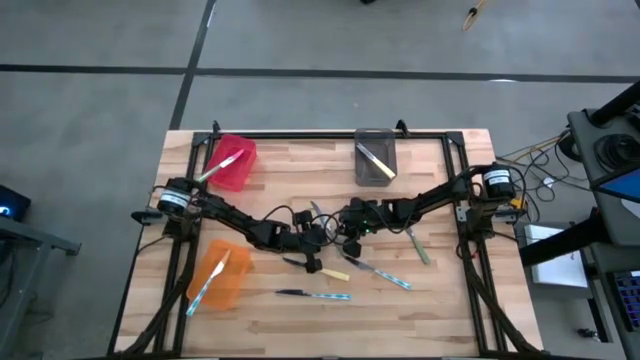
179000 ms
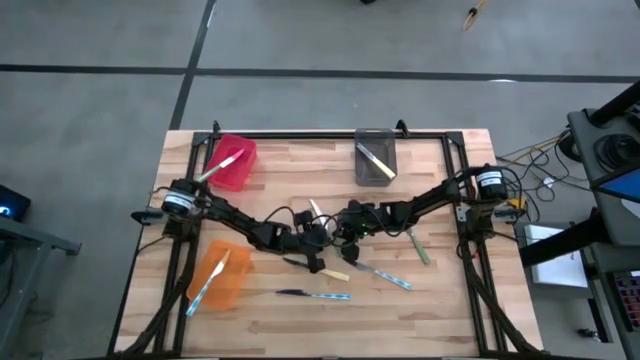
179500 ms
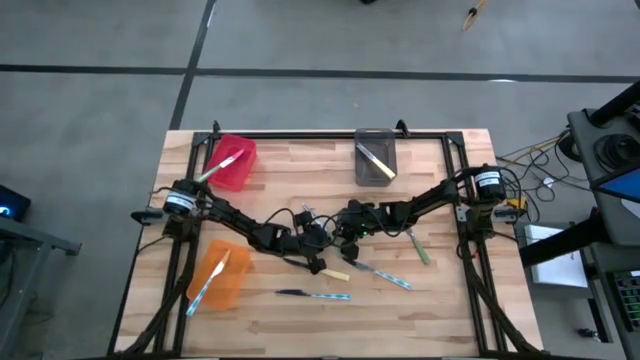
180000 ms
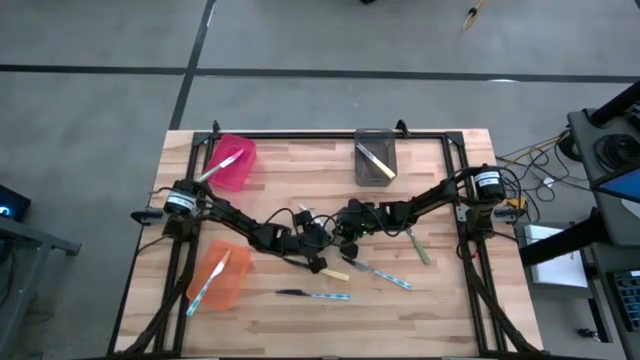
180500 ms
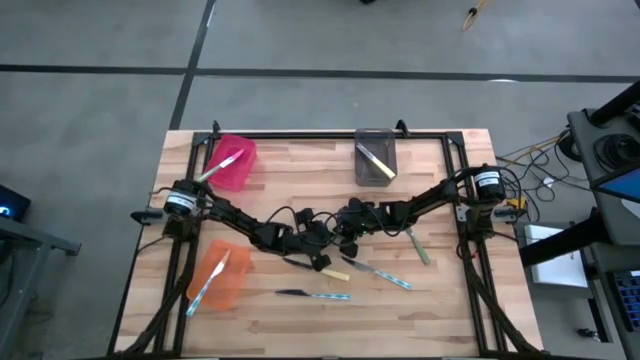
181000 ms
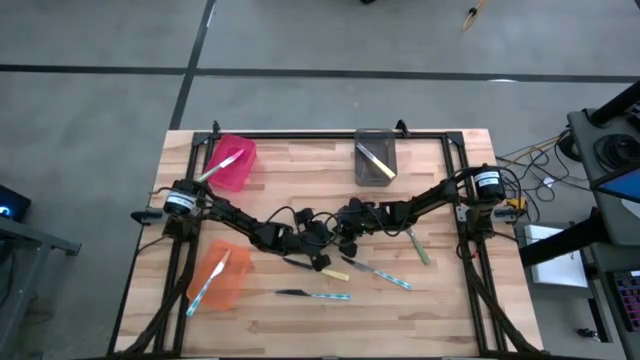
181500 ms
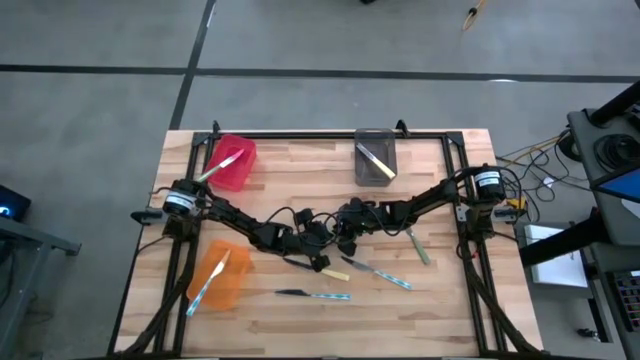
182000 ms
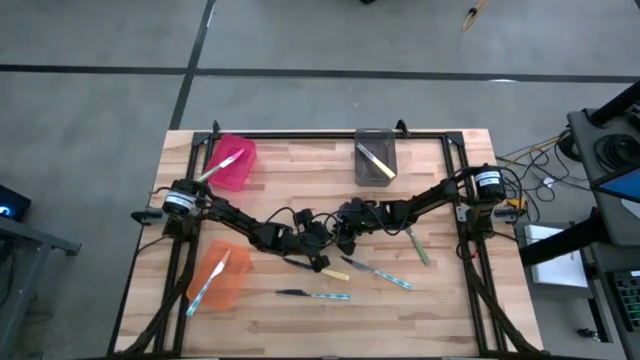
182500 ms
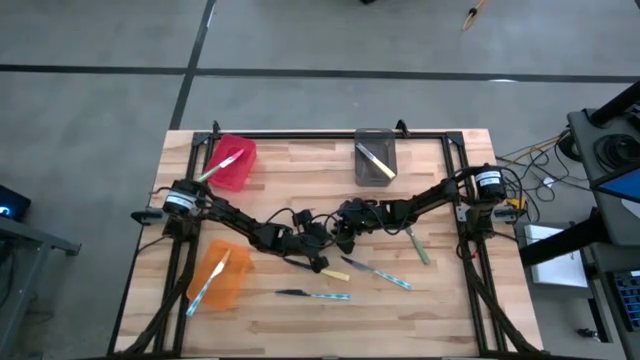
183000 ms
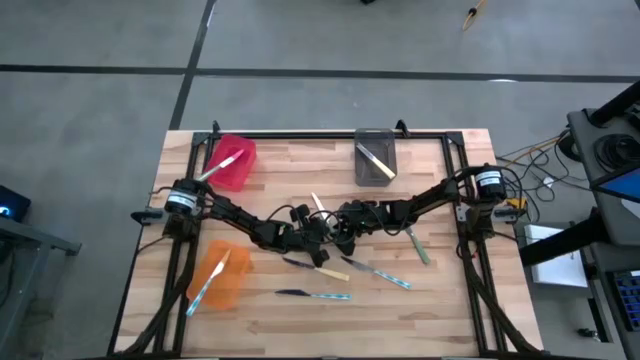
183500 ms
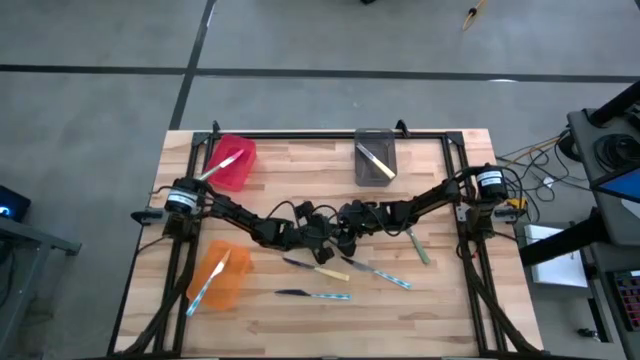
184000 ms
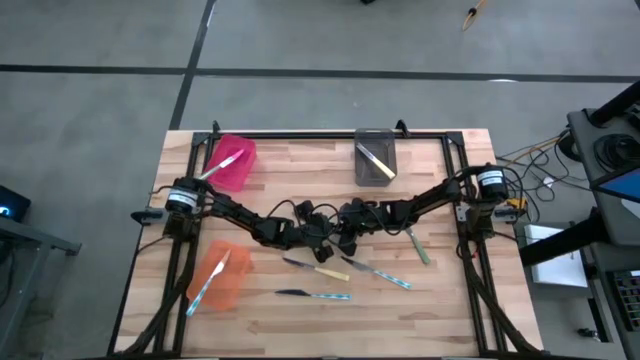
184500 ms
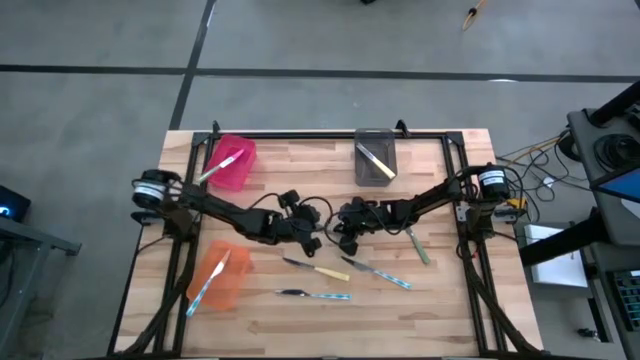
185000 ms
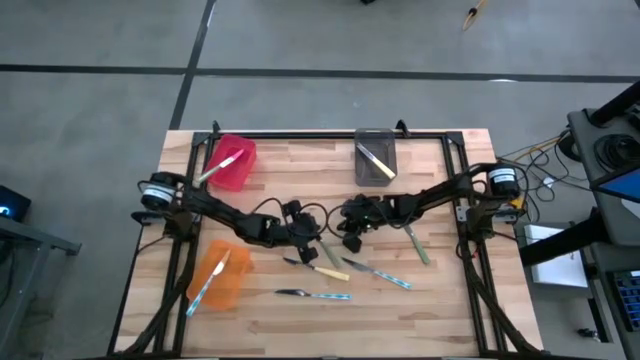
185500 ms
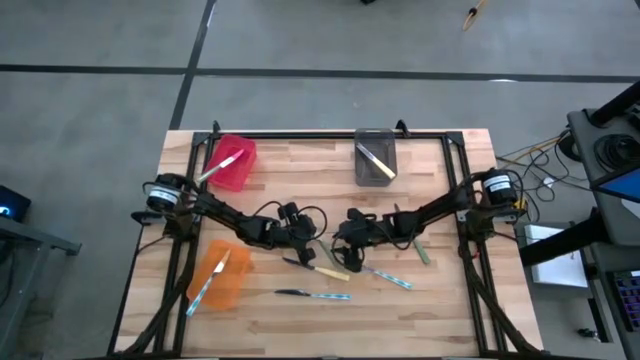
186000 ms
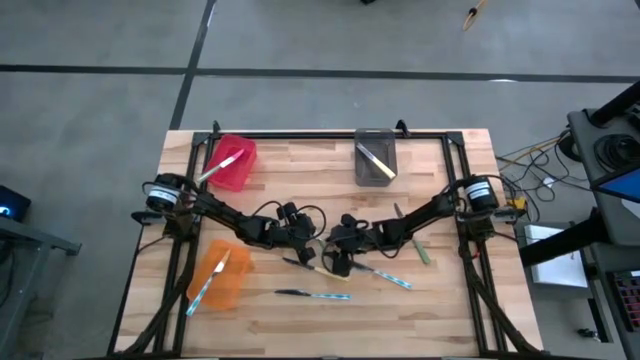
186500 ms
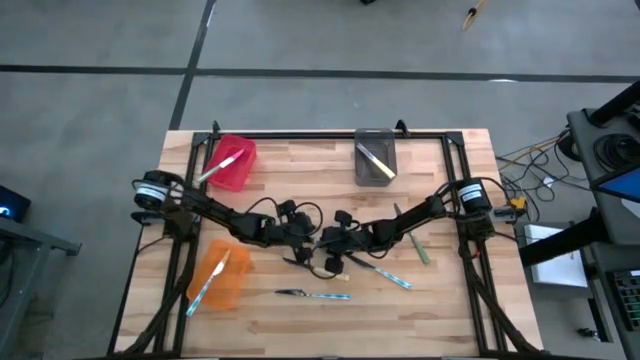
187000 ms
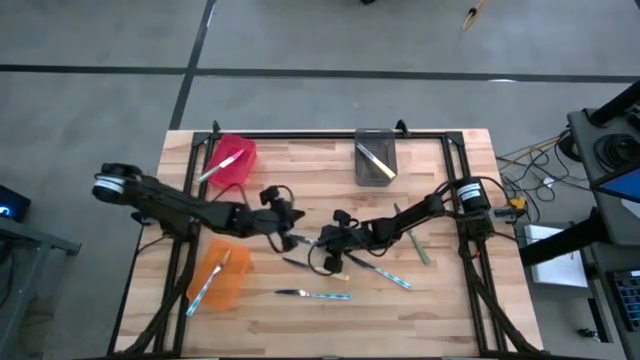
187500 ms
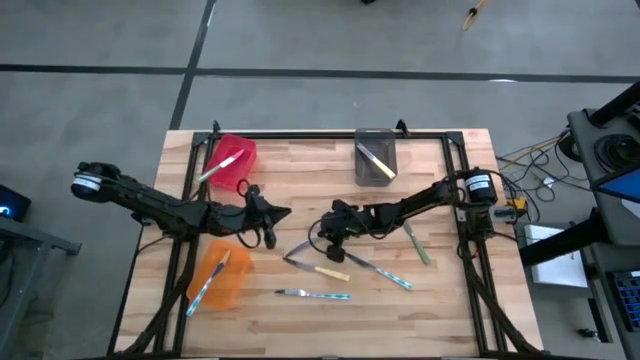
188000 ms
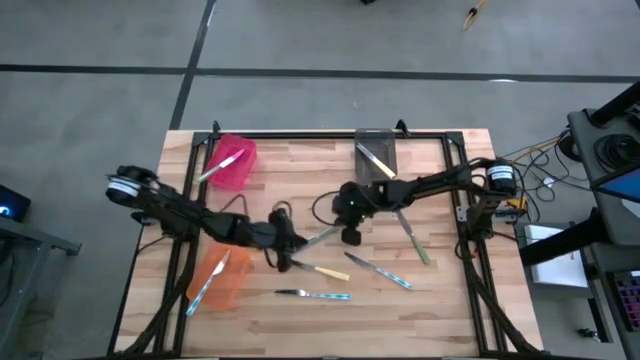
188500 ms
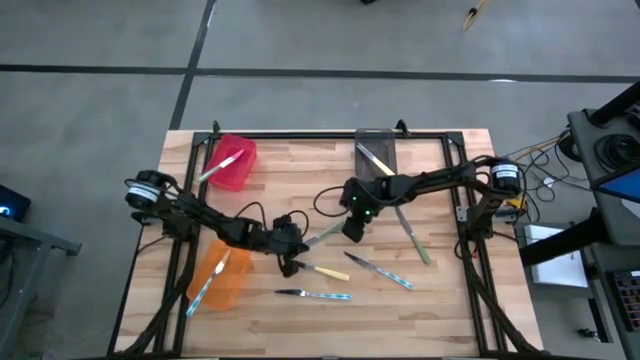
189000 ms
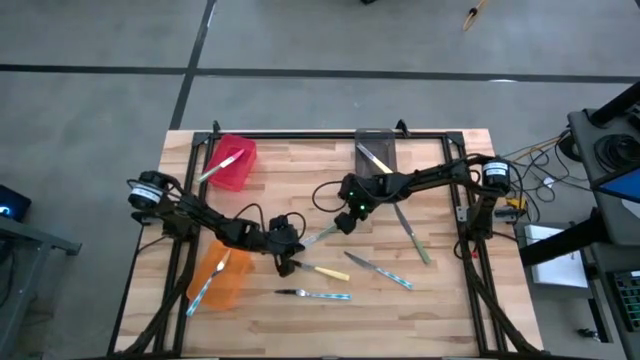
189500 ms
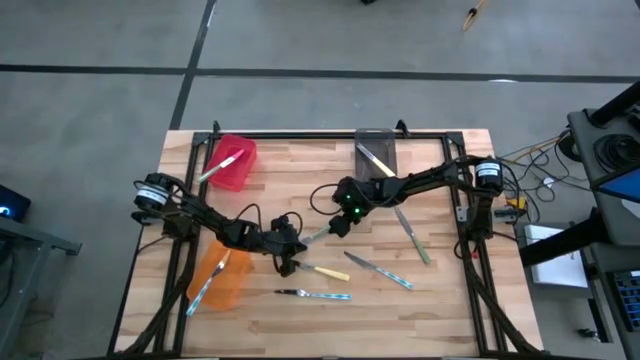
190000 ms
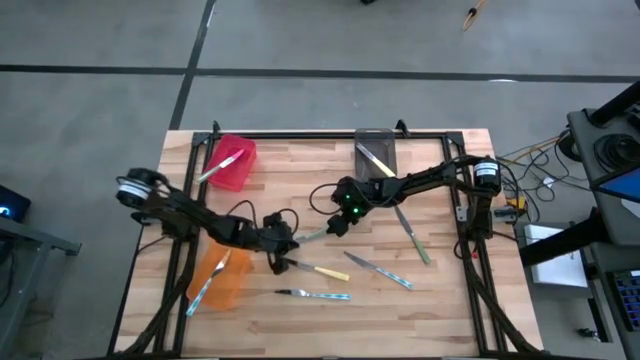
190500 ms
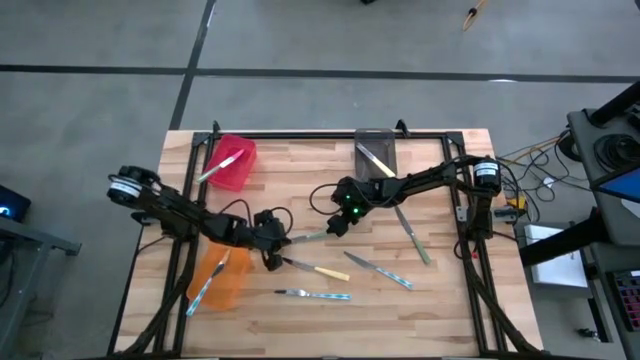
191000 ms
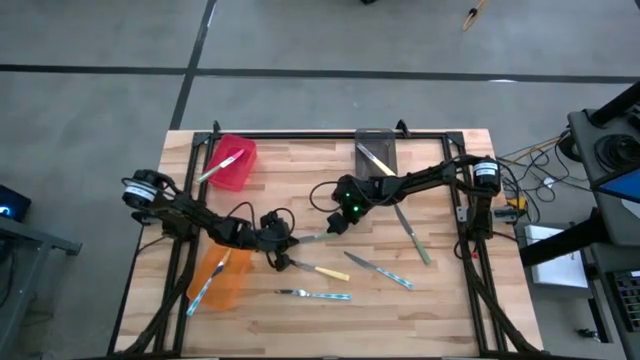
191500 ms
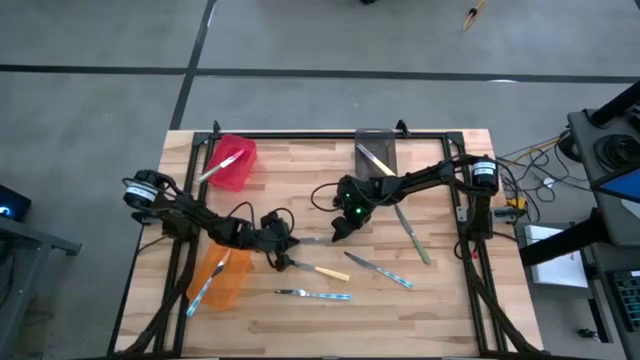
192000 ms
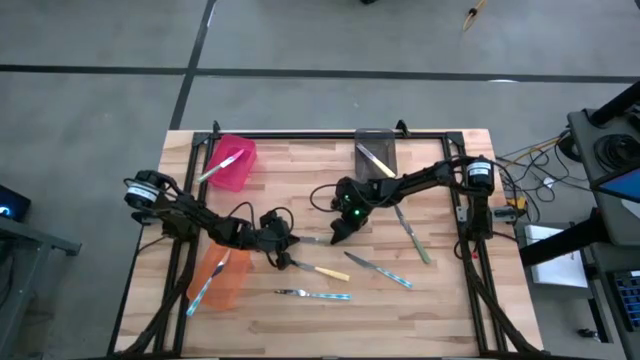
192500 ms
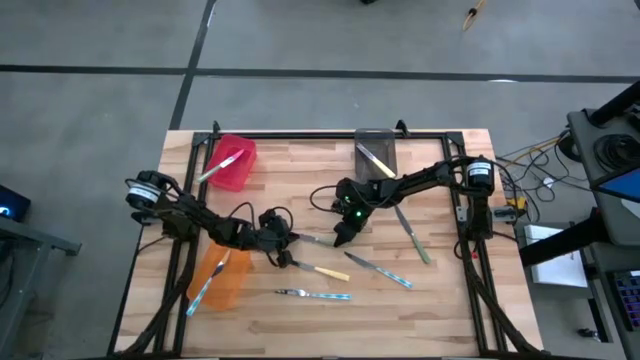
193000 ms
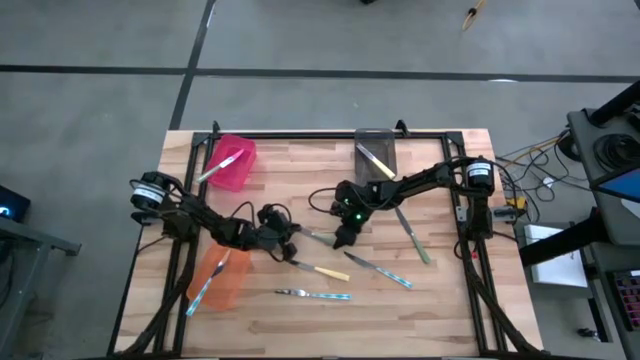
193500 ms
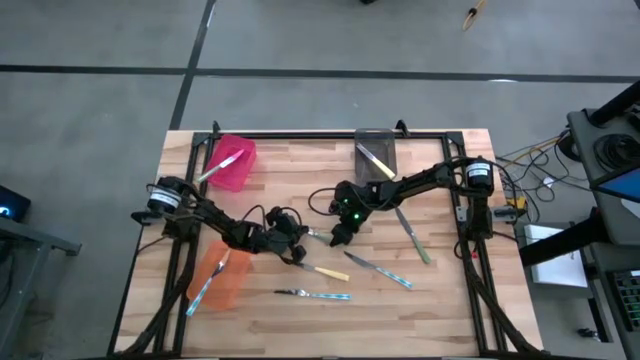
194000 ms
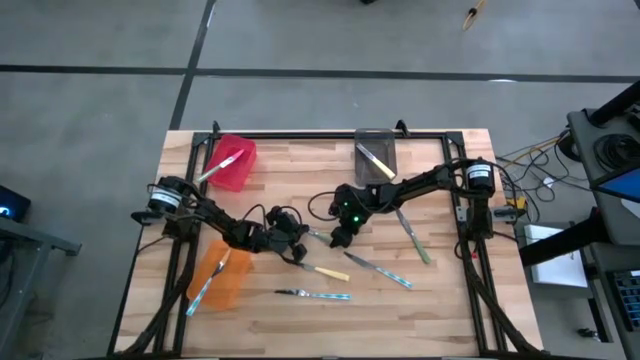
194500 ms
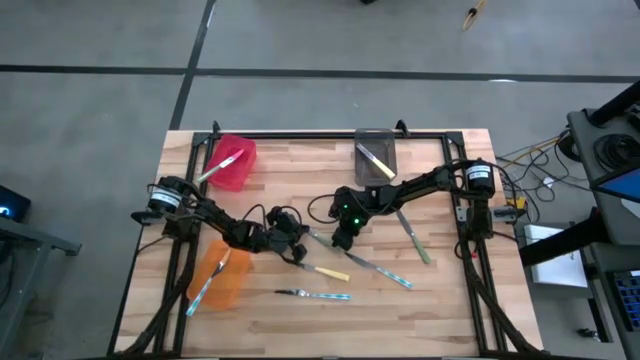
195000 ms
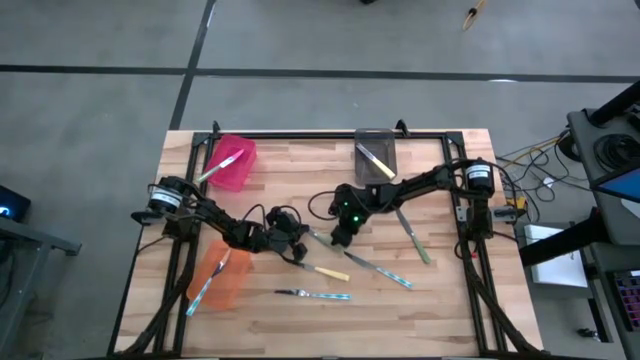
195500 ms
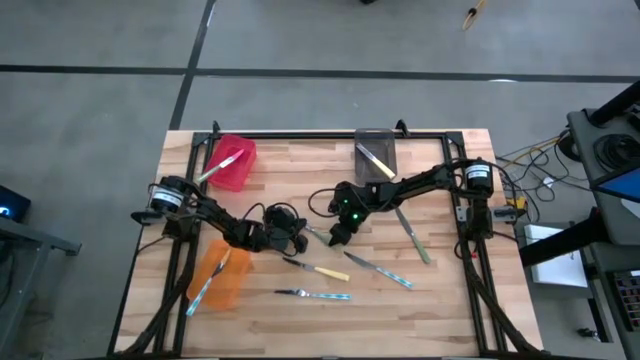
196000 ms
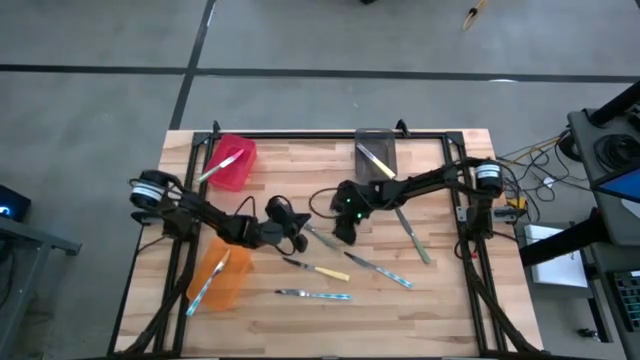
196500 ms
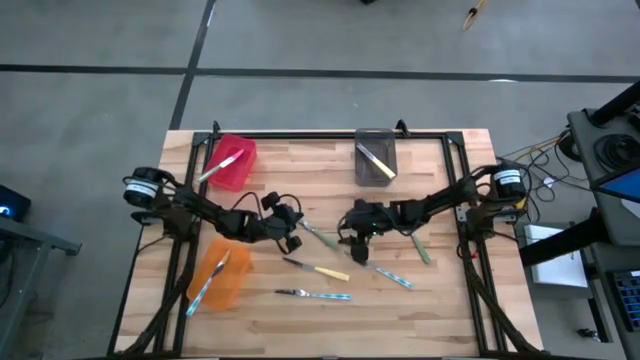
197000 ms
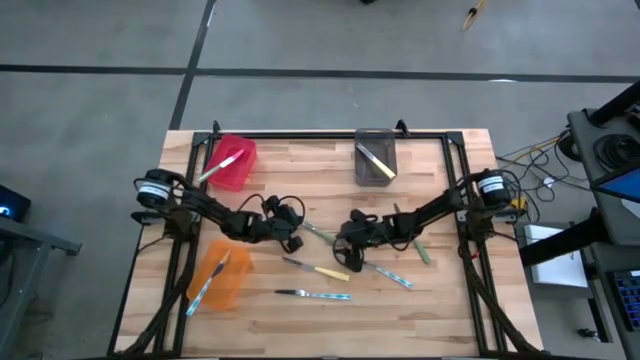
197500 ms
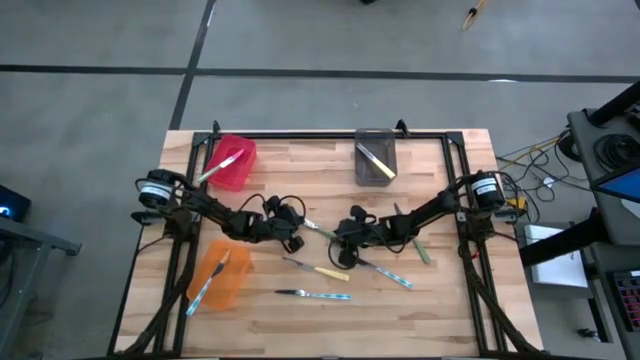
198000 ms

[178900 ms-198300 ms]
Task: Sort silverware by color (type)
Put the left green knife into the red bin

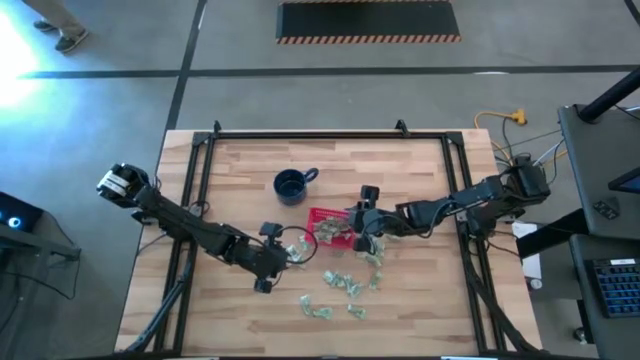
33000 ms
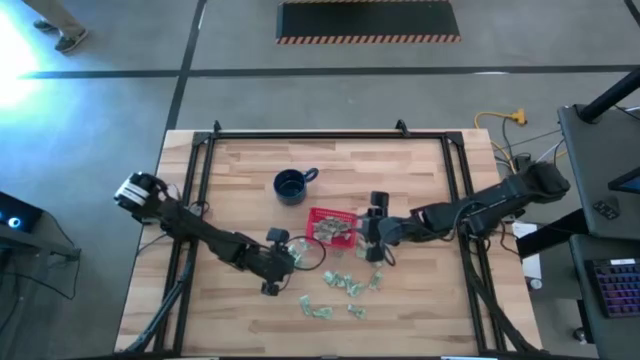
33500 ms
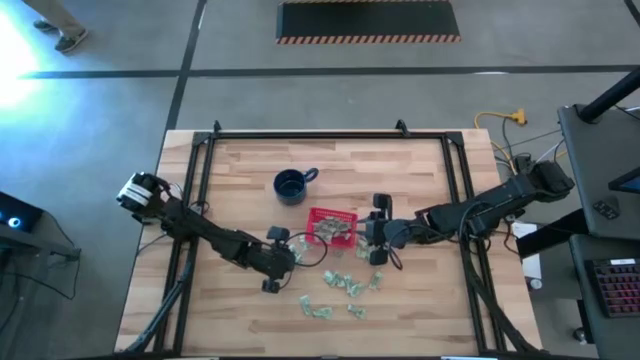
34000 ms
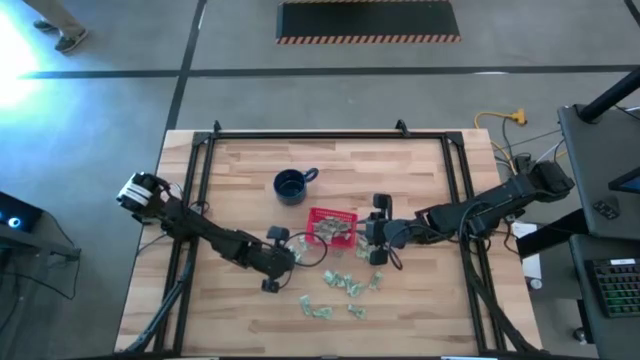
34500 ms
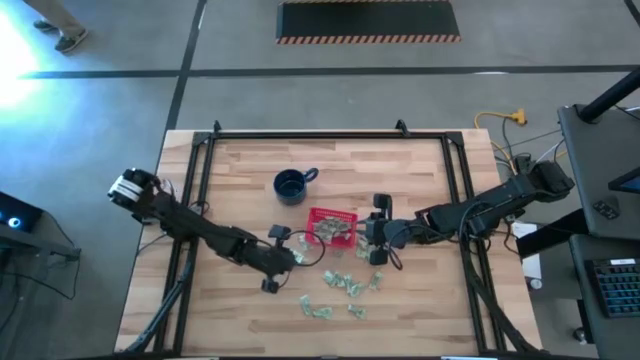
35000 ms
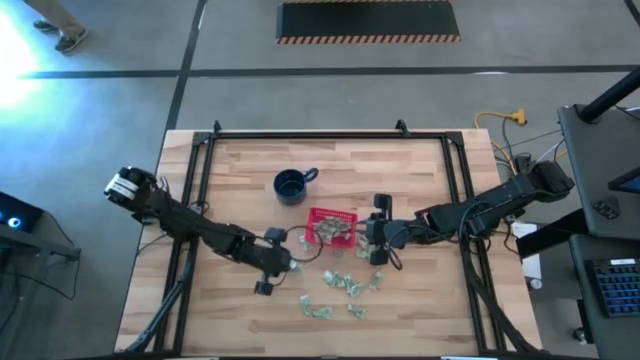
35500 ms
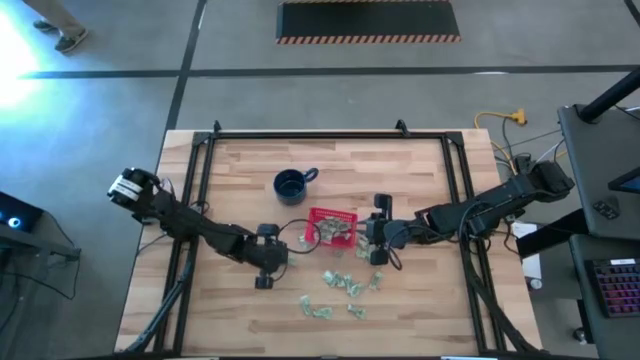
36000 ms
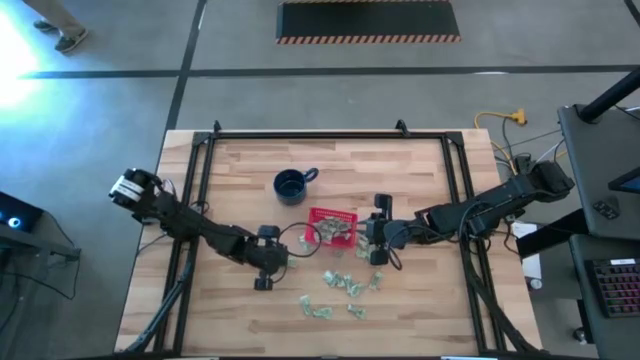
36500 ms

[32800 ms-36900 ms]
Task: Pick and place Stevia / Truvia into bins
Put the white stevia packet into the red basket
